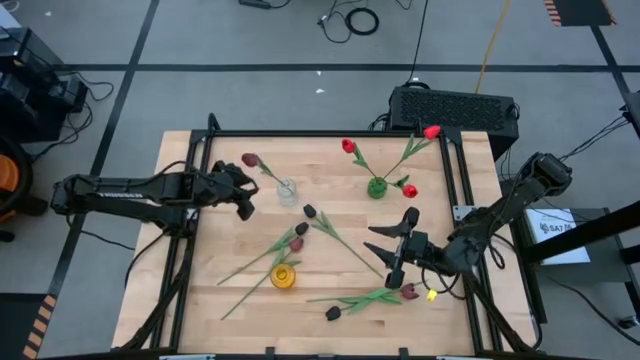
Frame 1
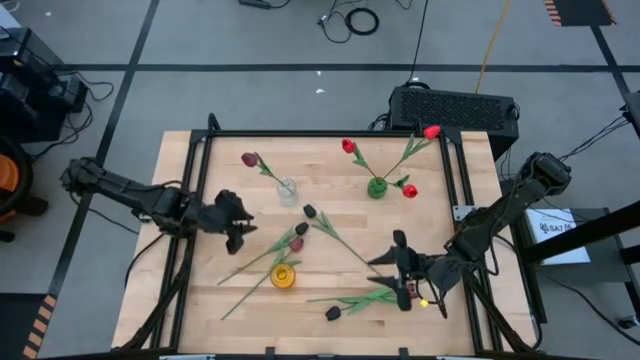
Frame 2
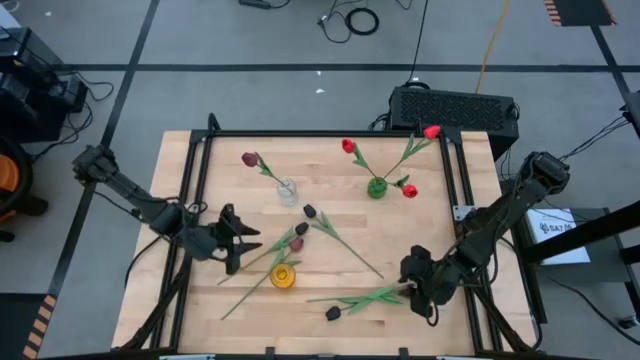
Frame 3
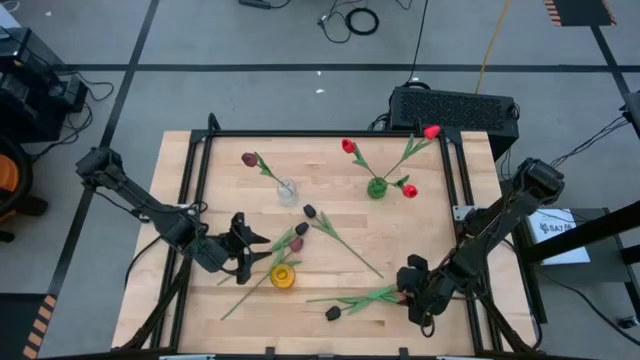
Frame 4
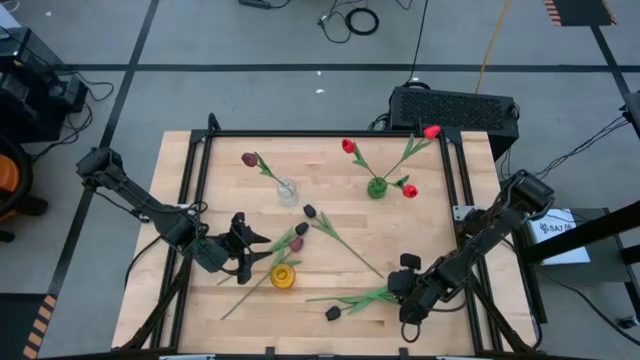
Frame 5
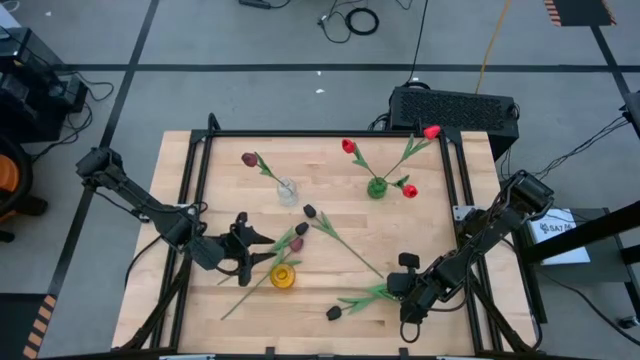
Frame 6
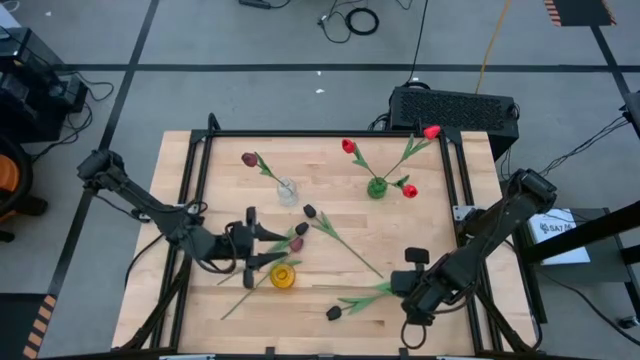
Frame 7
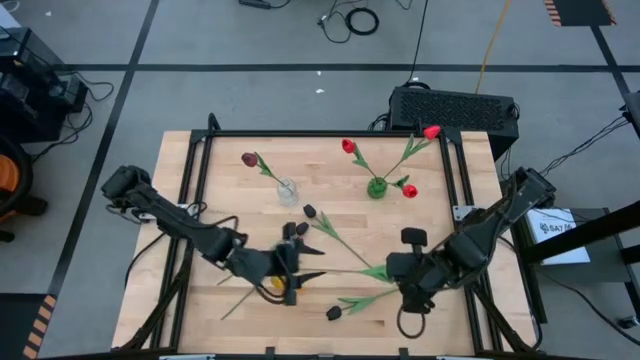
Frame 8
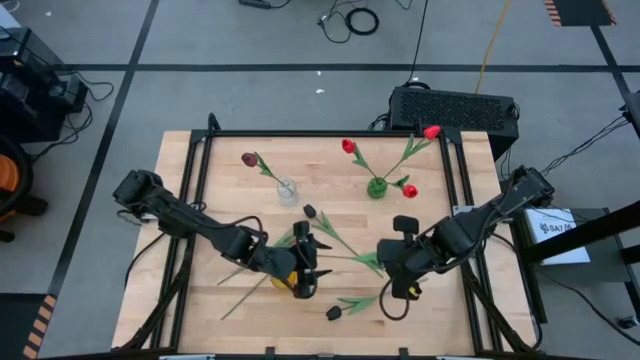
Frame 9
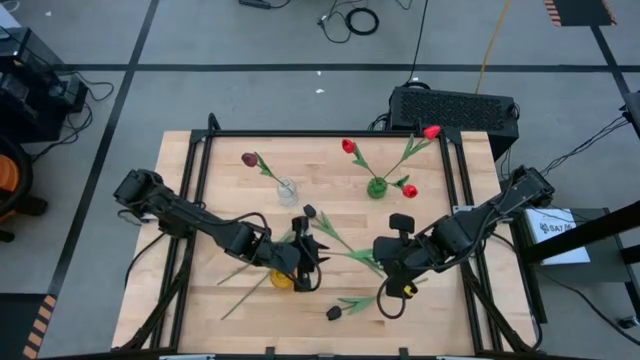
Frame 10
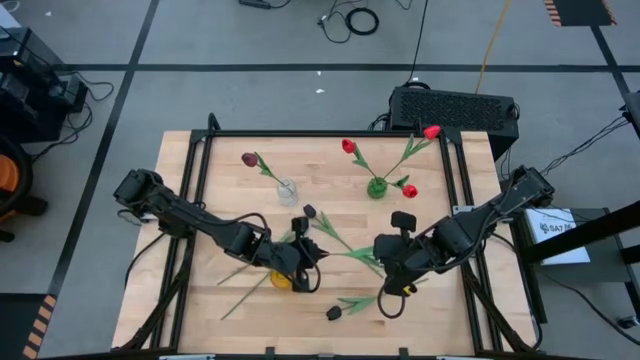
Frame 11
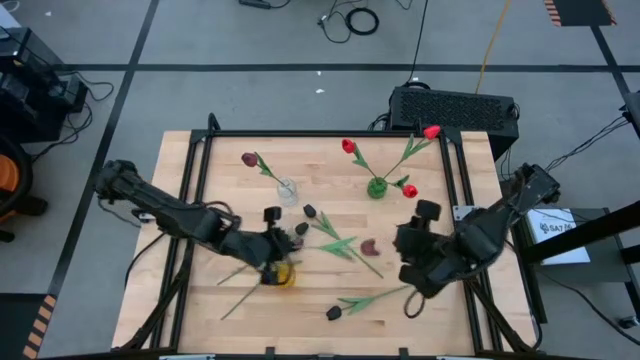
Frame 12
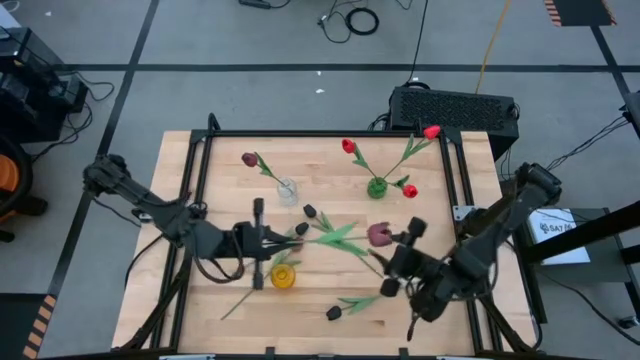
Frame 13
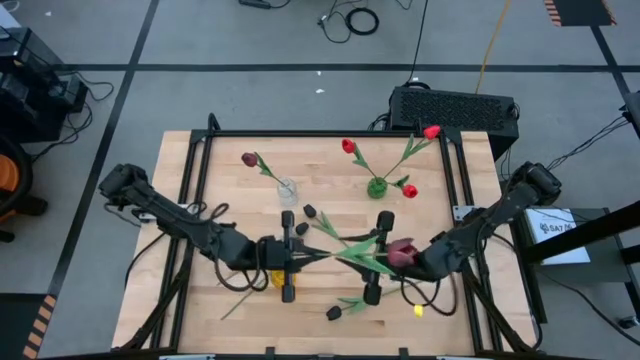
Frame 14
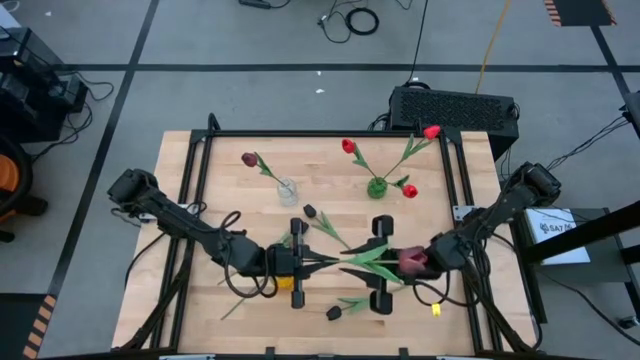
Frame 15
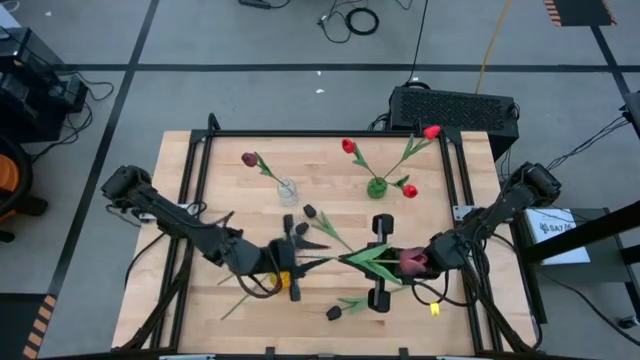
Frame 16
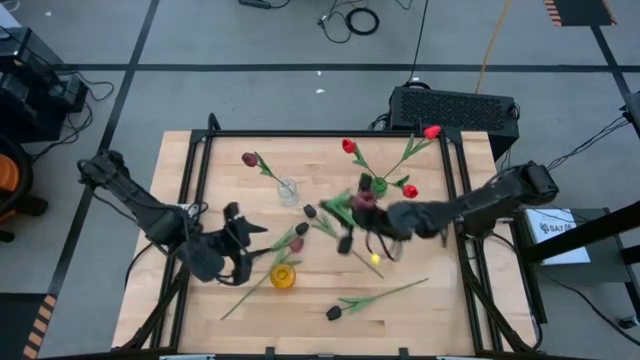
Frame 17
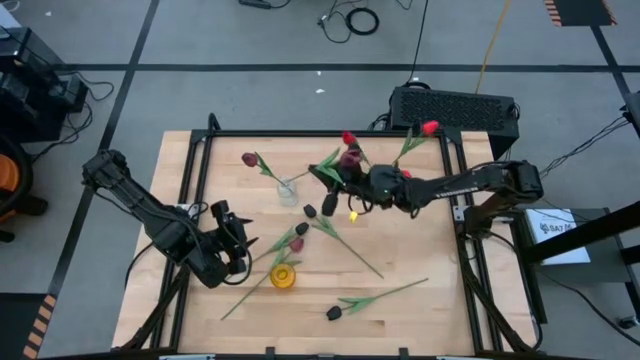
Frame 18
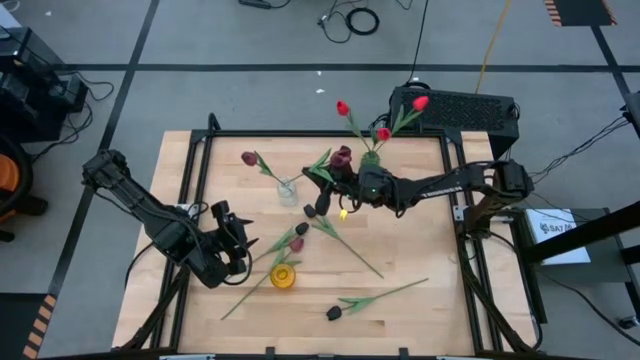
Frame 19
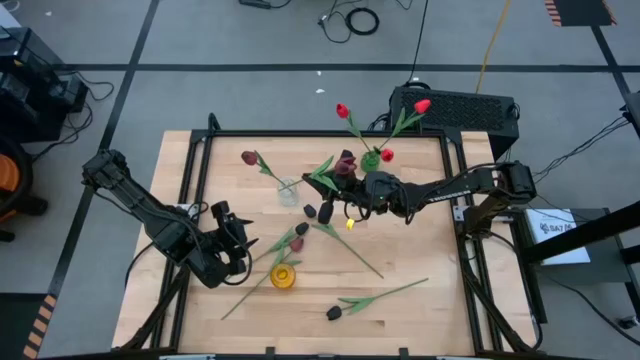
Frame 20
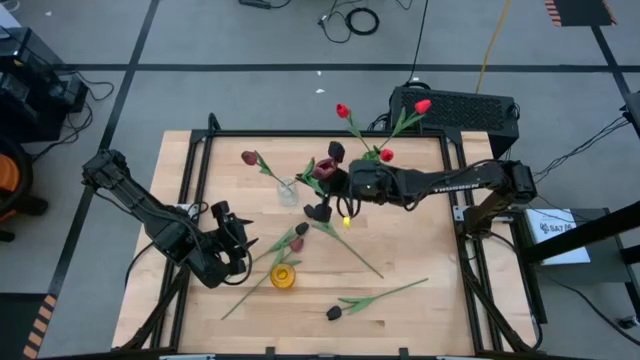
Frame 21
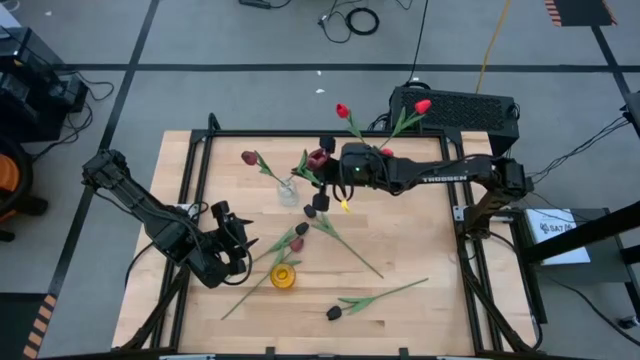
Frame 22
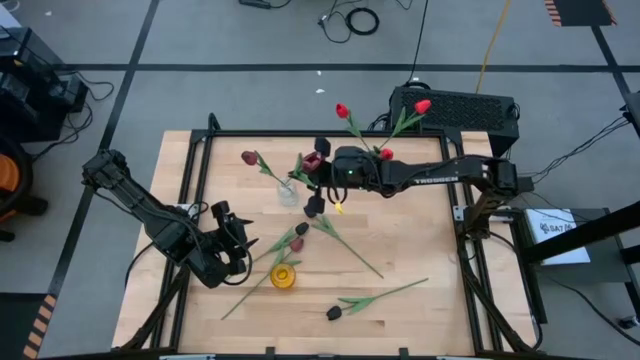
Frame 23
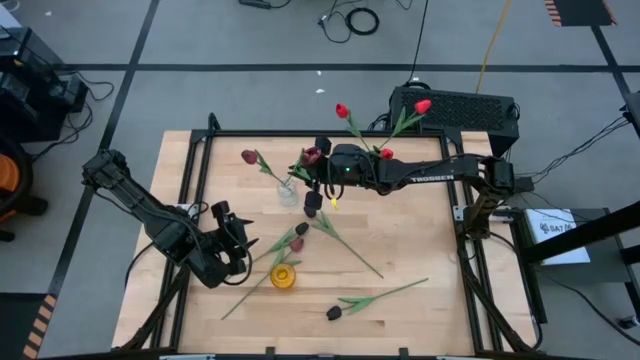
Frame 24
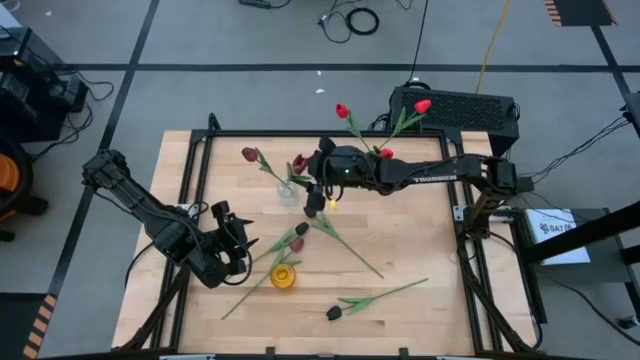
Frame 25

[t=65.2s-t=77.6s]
Task: Sort flowers into vase by color
Put the right dark red tulip into the transparent vase

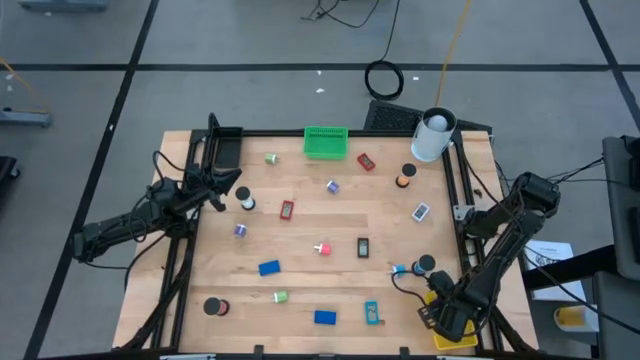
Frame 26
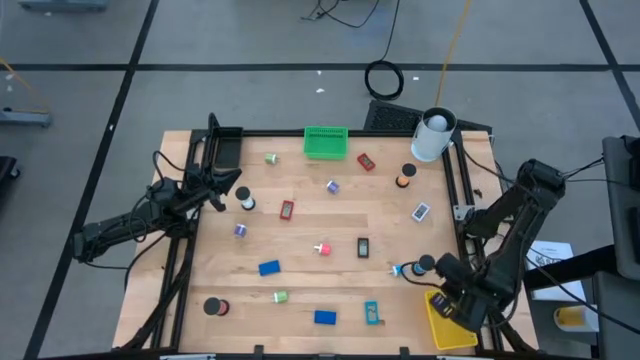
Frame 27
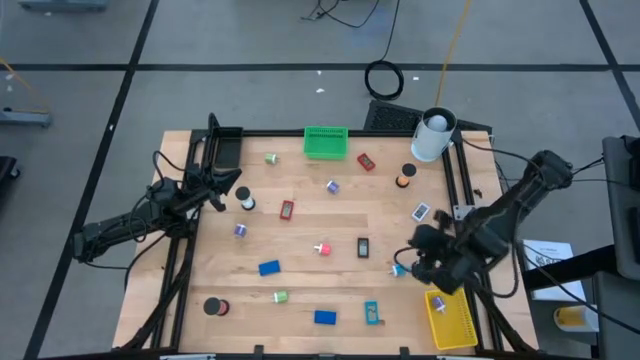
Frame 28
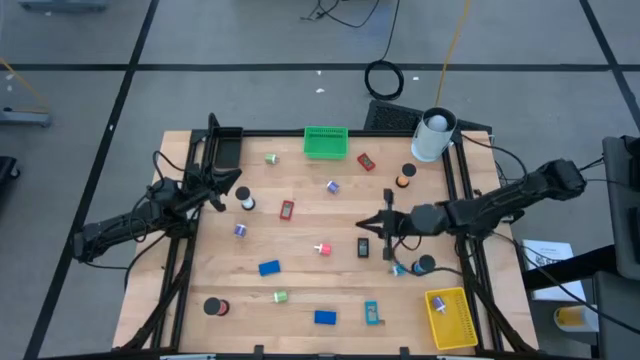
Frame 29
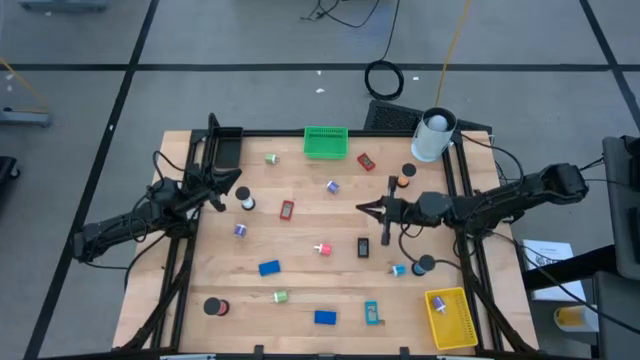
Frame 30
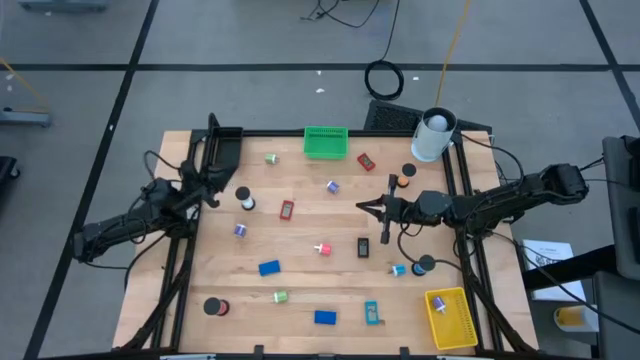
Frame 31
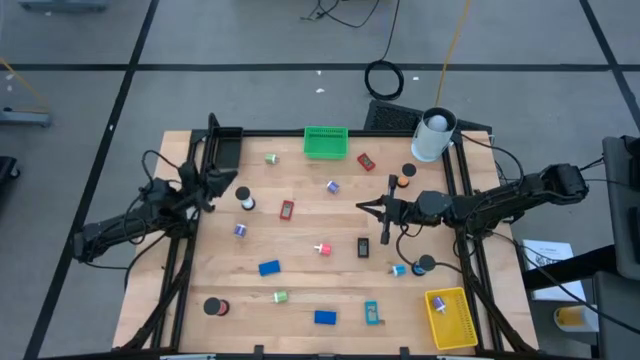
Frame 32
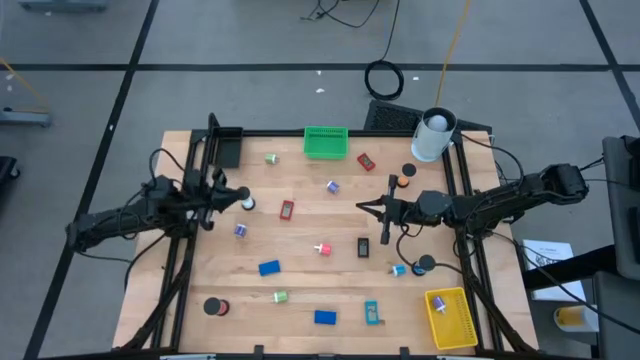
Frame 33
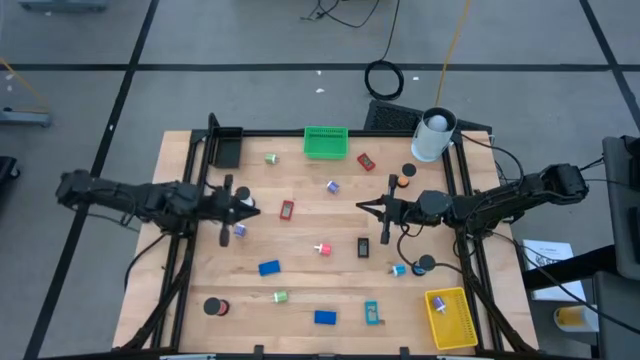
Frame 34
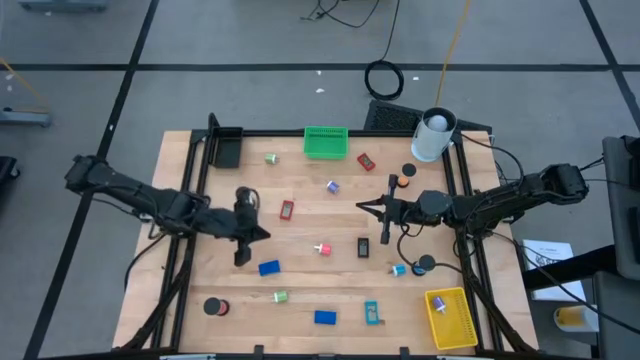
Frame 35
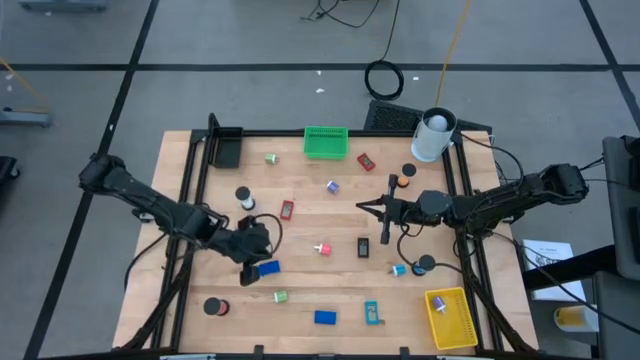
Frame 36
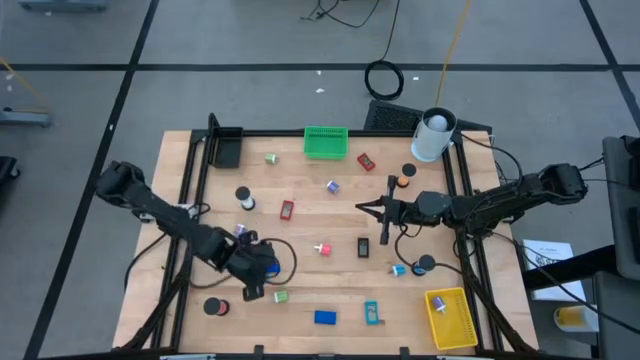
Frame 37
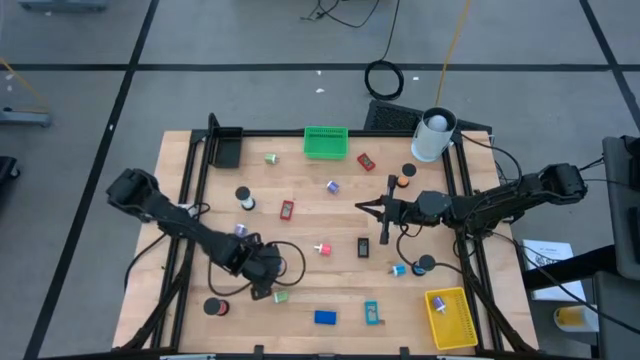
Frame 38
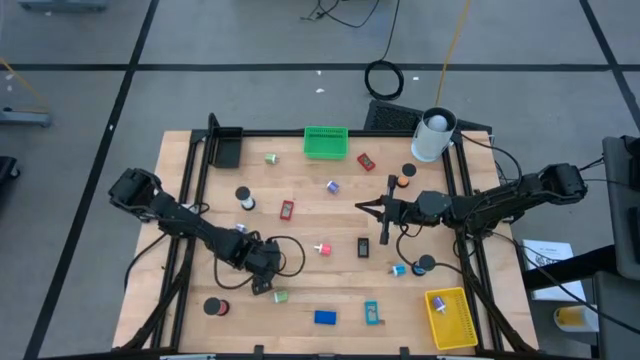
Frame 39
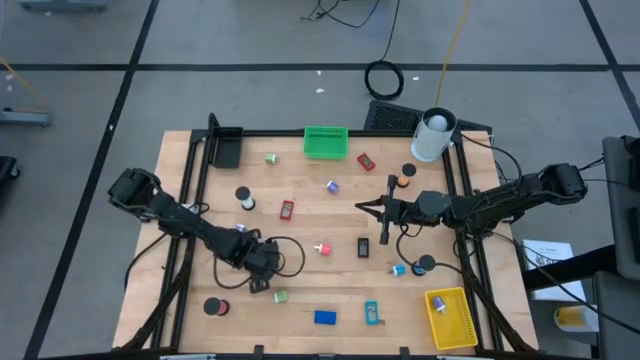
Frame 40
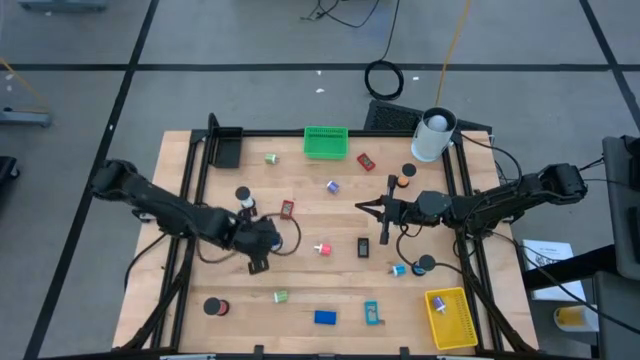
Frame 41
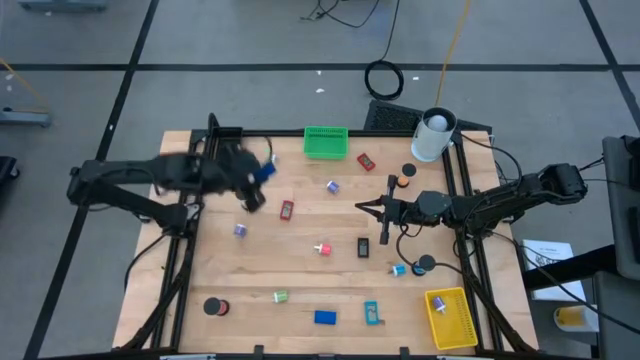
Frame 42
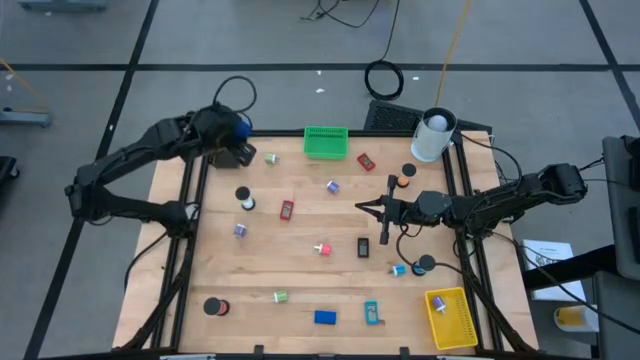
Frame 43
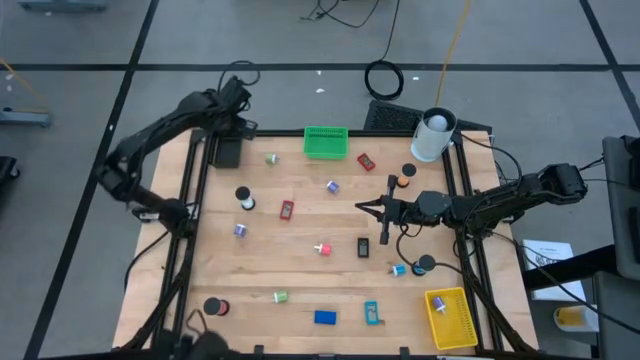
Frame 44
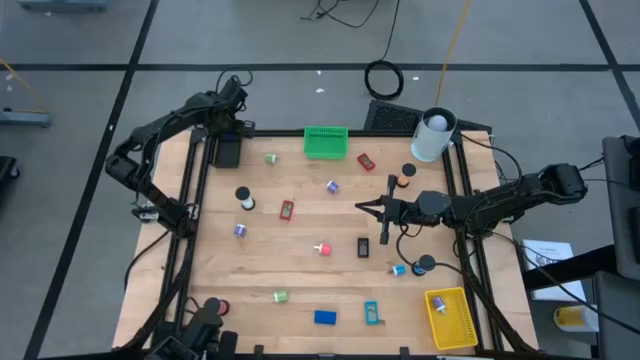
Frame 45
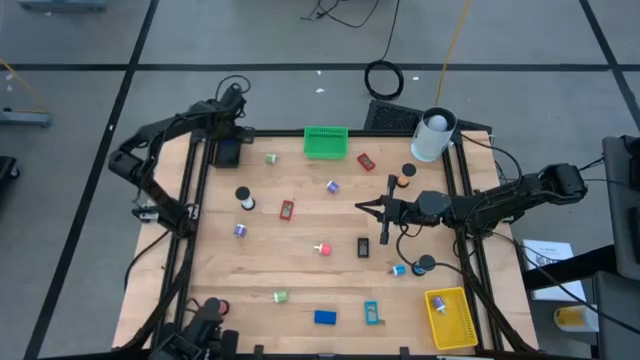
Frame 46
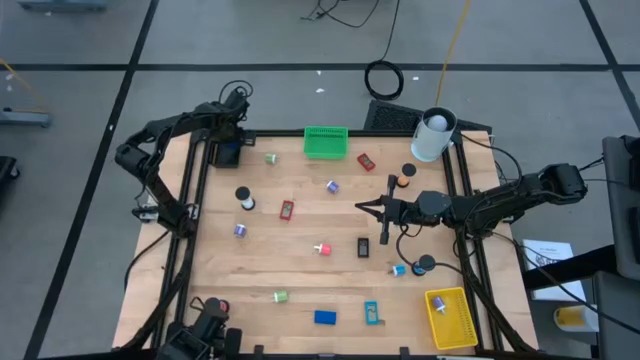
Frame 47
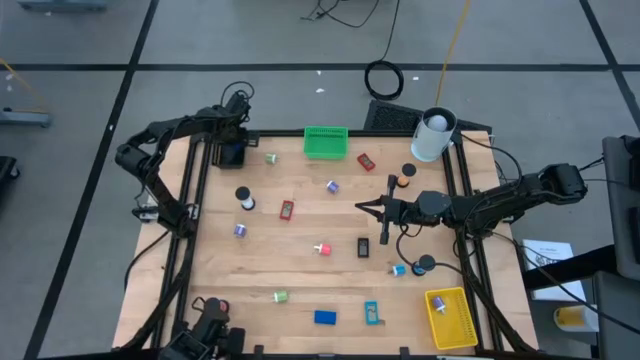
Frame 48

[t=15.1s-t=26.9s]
Task: Pick & Place Office items
Put the top dark blue digital clock into the black basket
